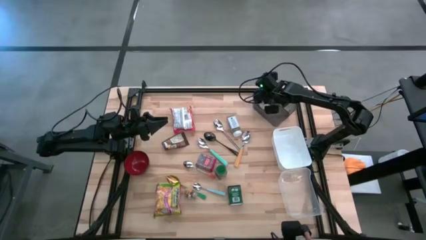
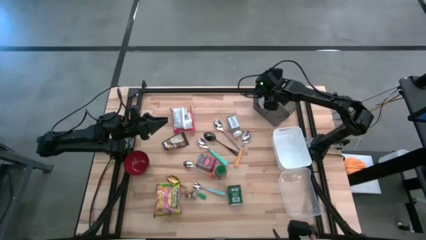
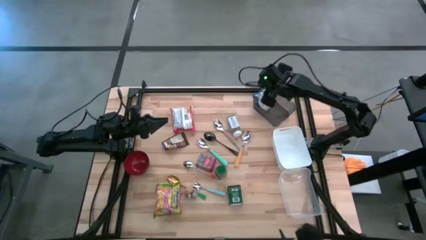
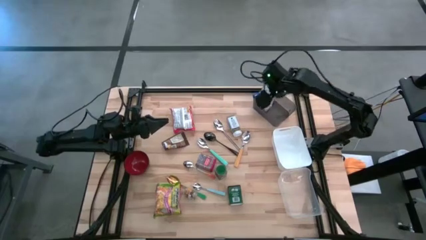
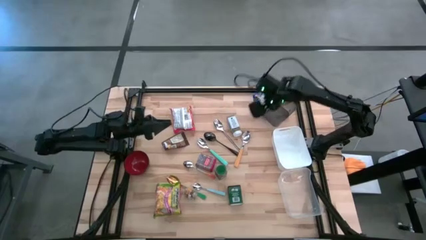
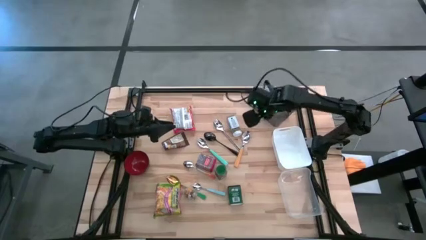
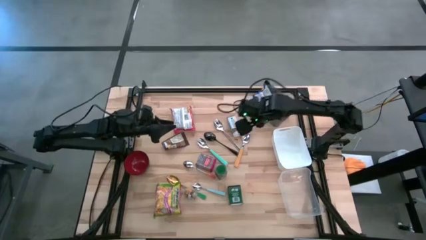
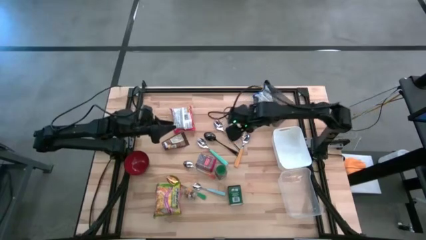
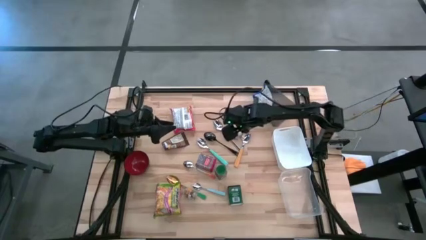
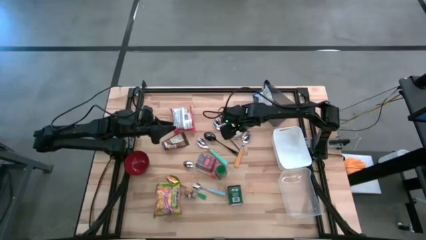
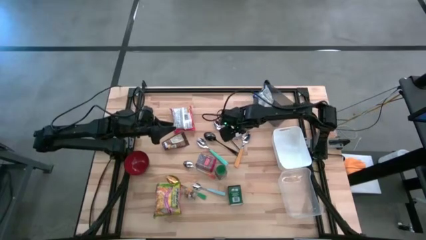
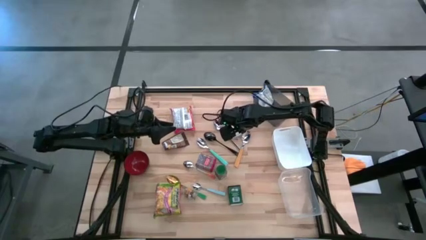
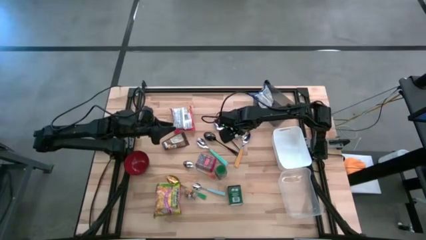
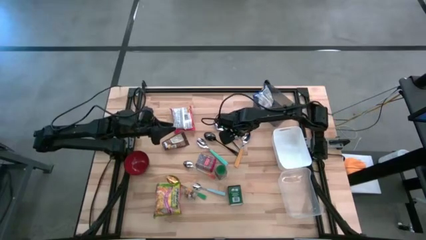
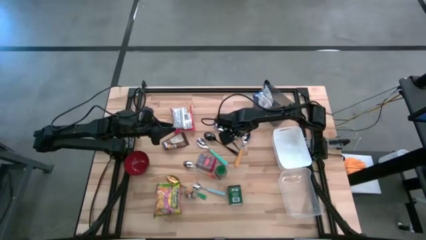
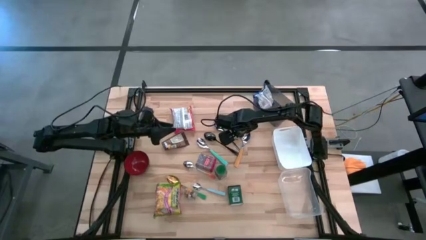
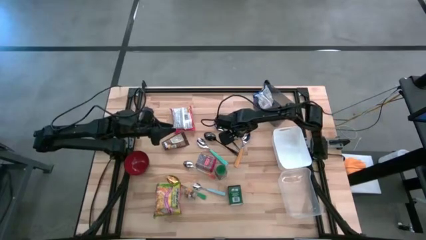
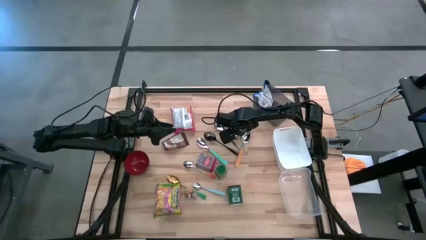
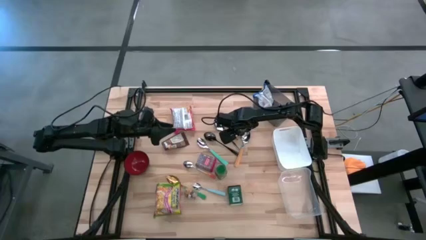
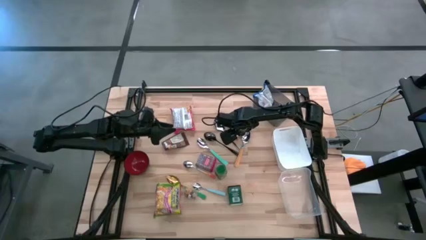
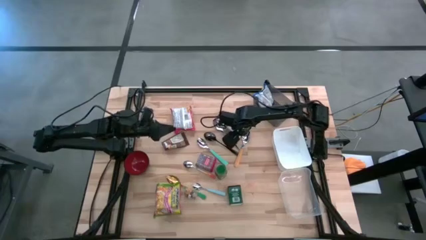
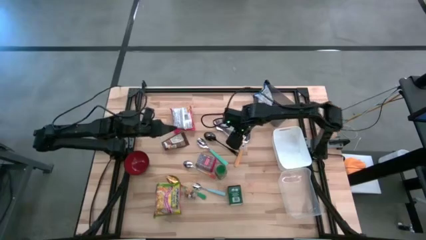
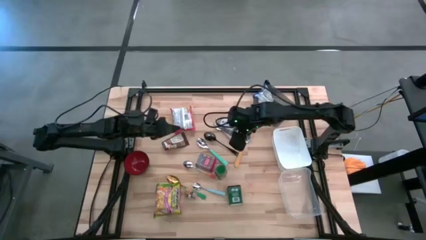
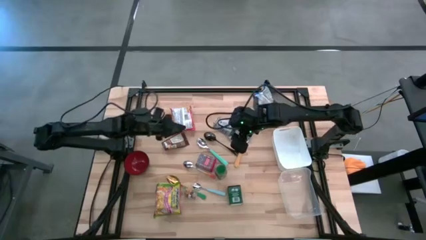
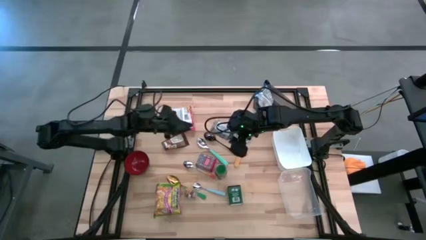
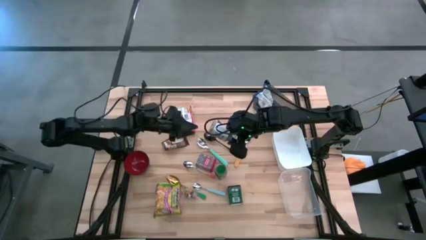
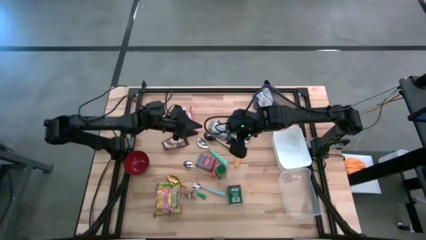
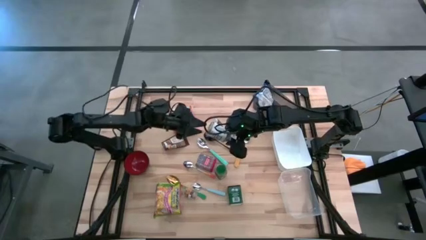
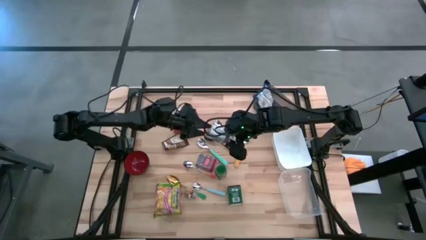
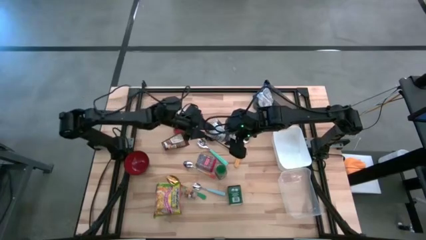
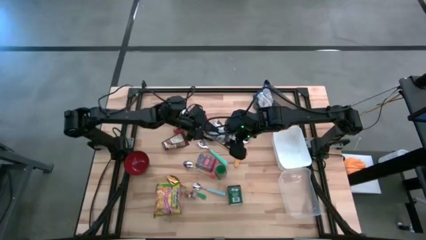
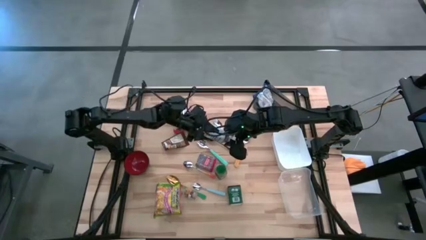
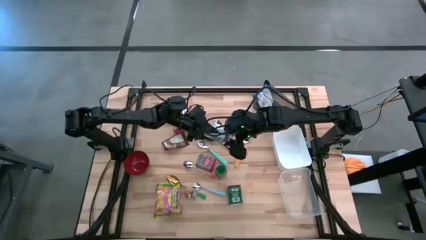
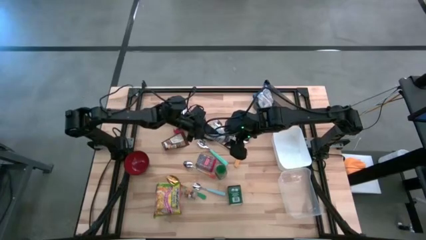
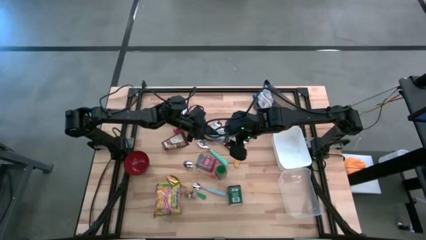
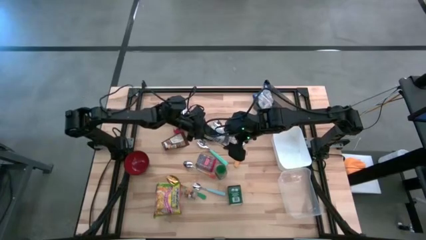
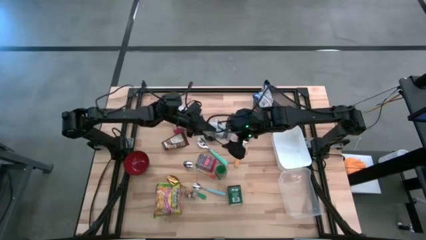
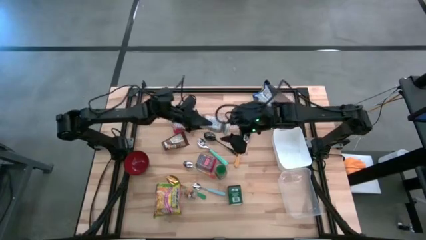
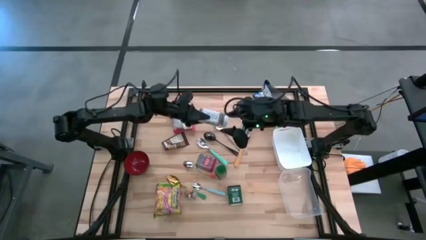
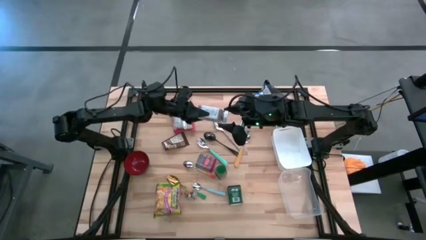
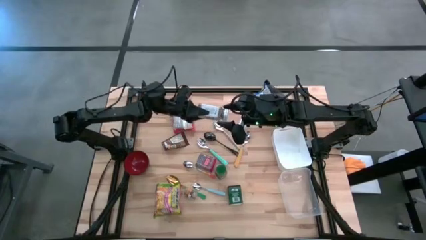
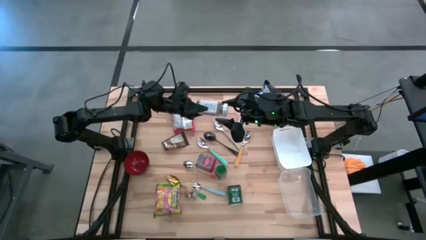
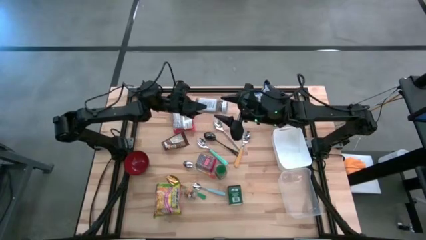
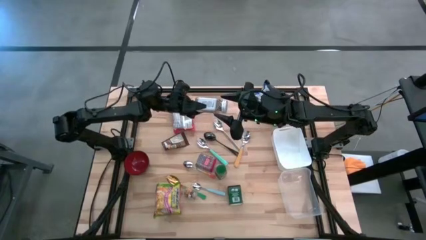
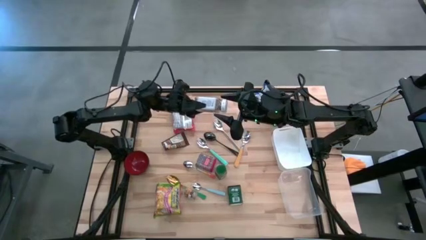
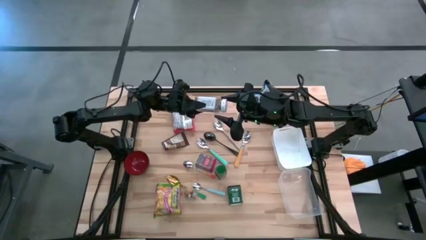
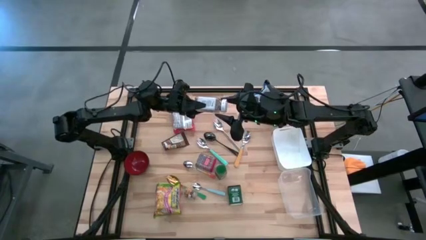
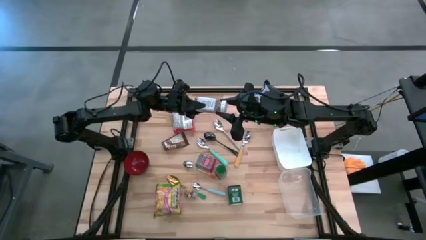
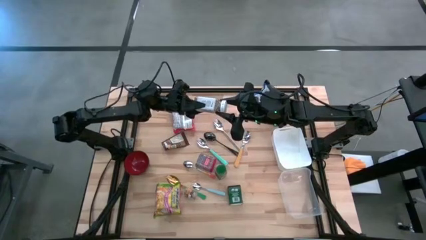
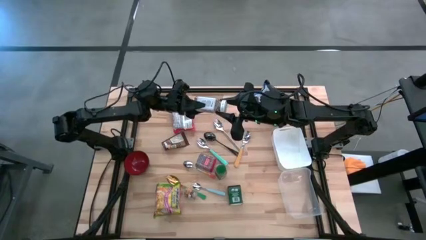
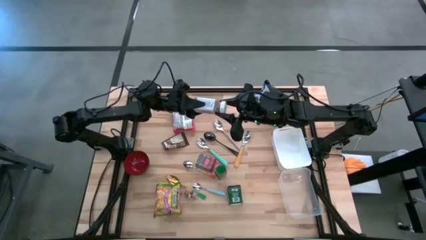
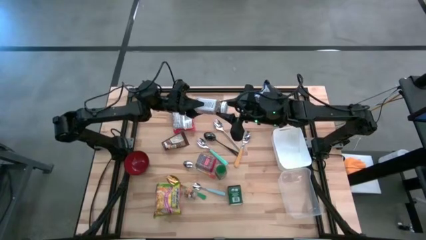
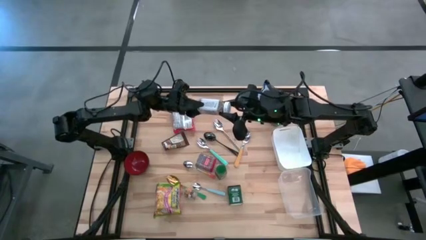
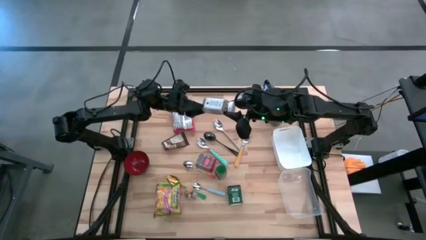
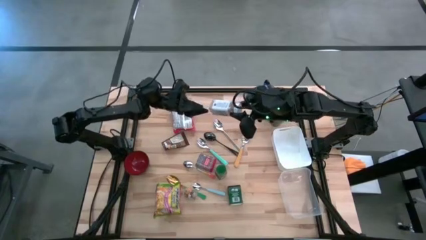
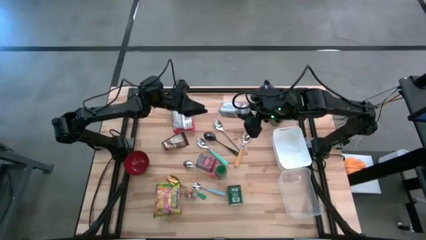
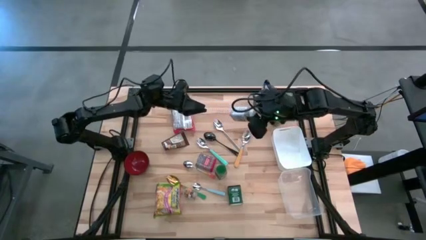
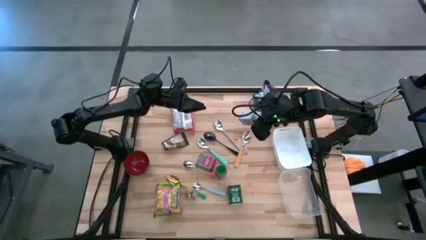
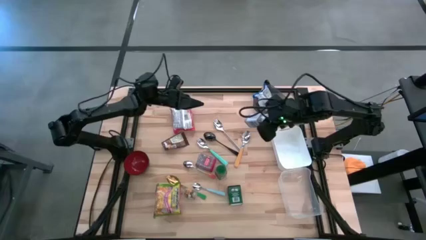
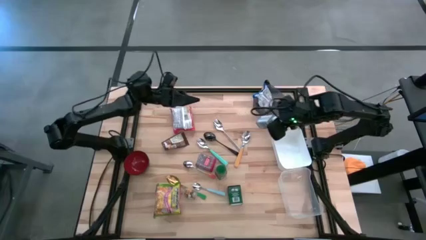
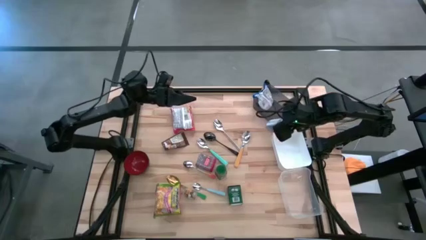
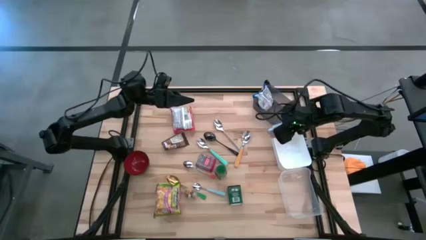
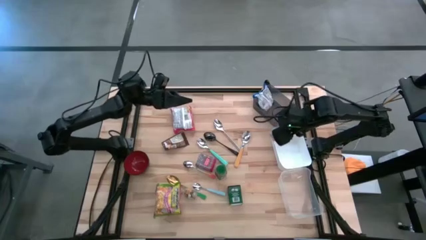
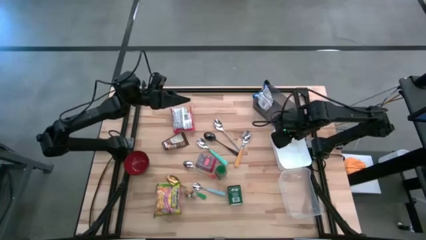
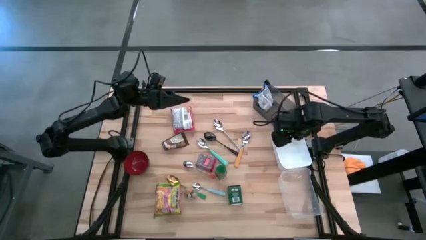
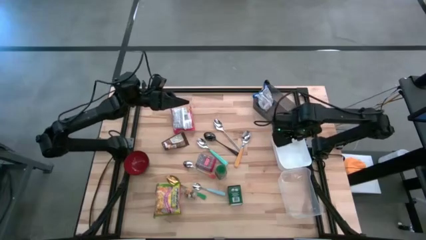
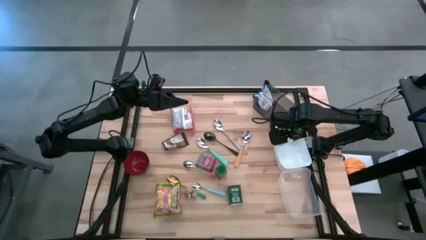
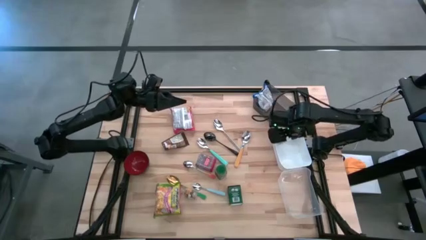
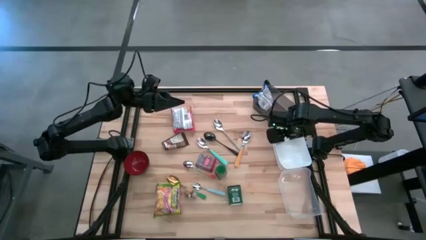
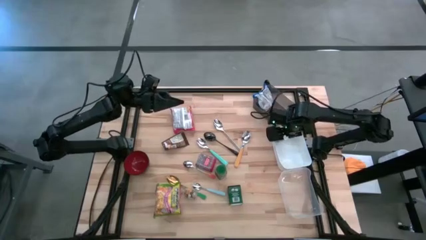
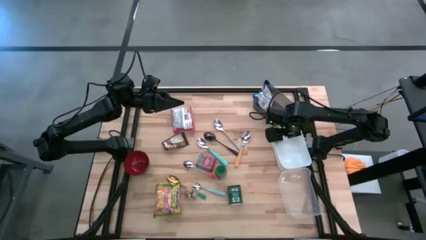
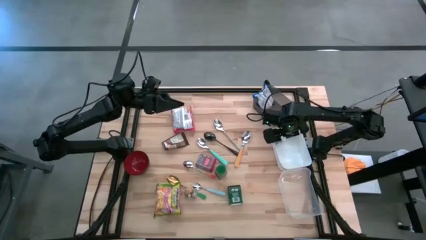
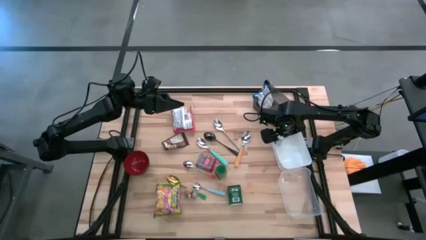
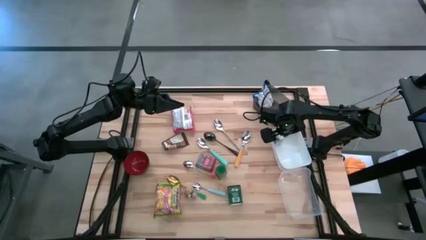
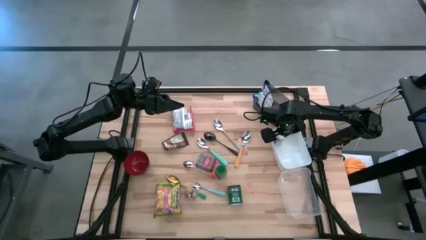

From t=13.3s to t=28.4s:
Put the white seasoning bottle into the white bin
